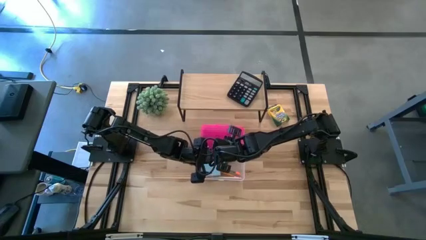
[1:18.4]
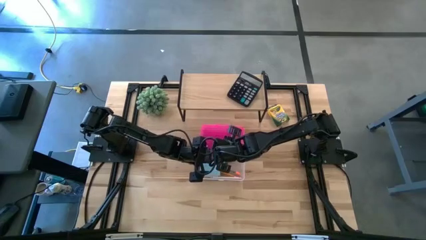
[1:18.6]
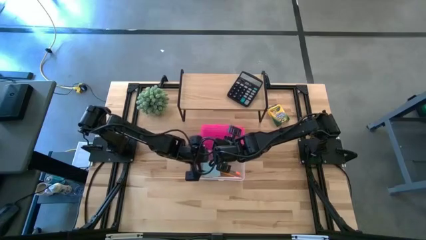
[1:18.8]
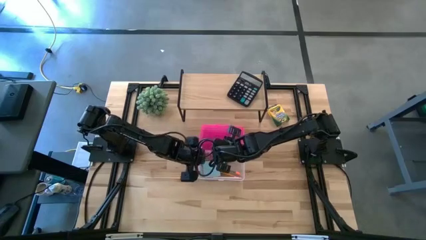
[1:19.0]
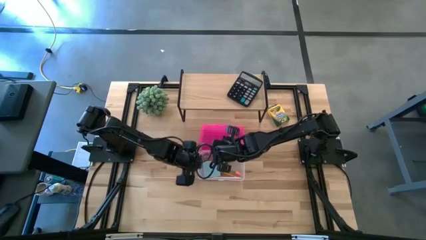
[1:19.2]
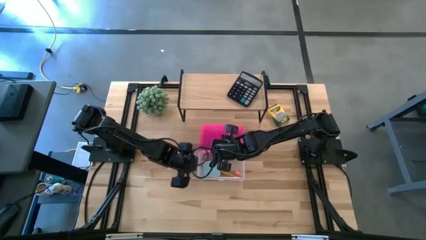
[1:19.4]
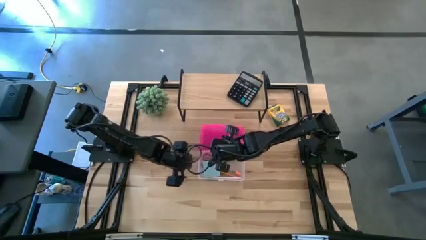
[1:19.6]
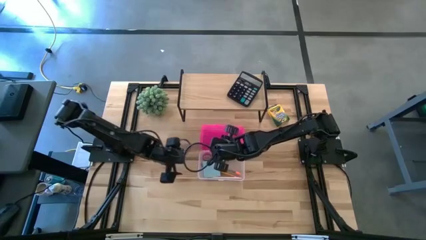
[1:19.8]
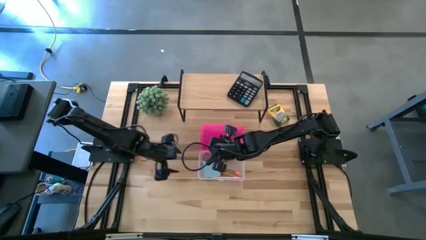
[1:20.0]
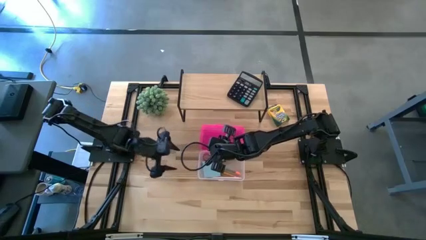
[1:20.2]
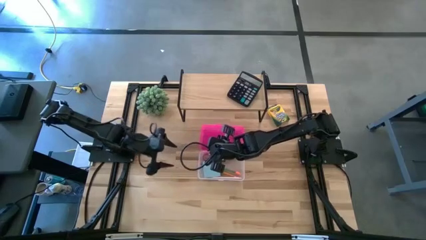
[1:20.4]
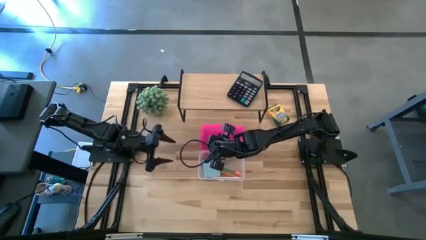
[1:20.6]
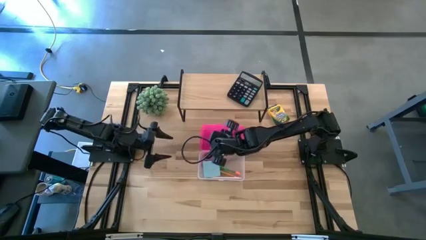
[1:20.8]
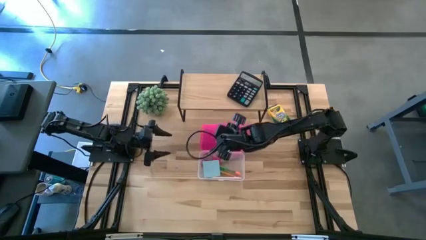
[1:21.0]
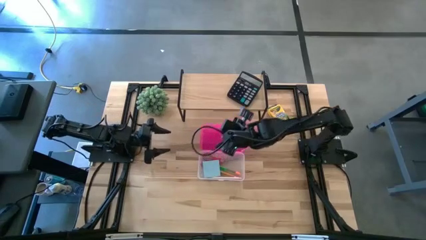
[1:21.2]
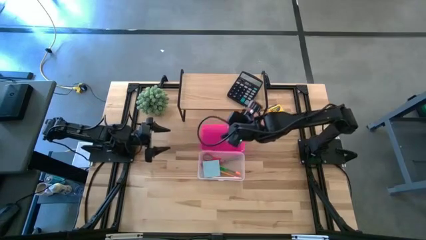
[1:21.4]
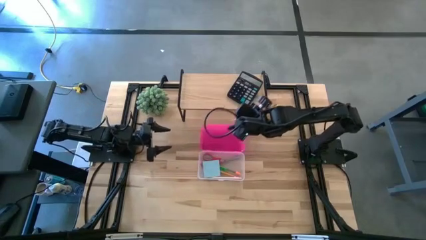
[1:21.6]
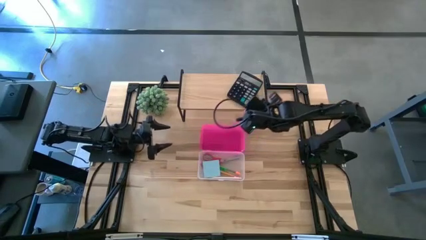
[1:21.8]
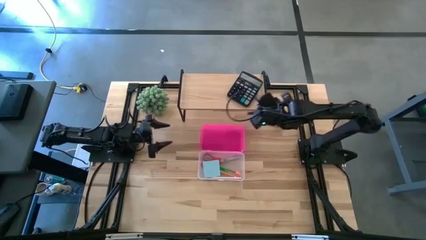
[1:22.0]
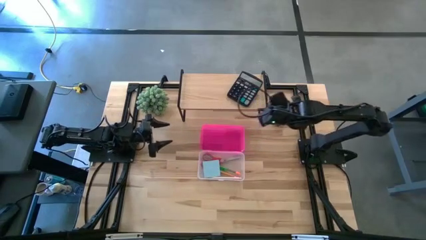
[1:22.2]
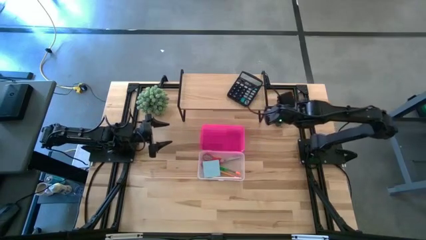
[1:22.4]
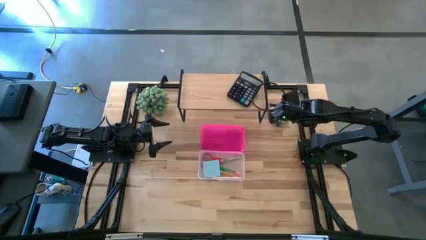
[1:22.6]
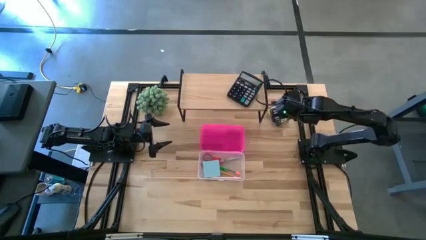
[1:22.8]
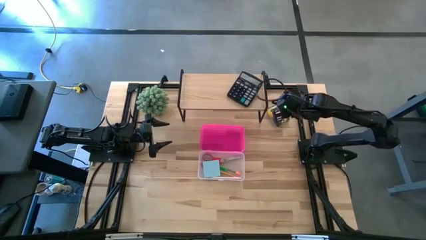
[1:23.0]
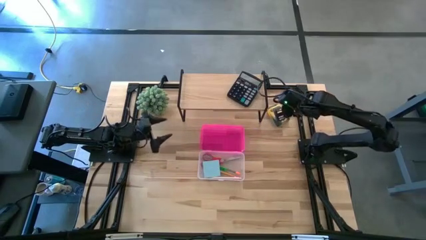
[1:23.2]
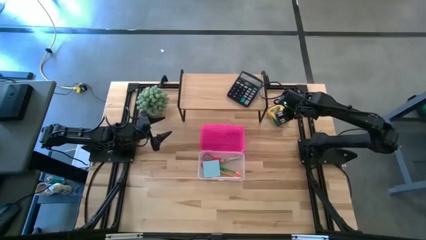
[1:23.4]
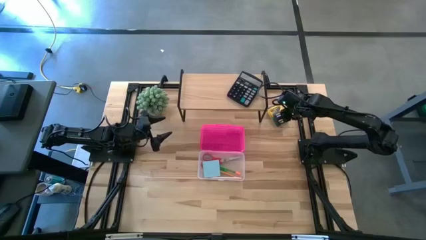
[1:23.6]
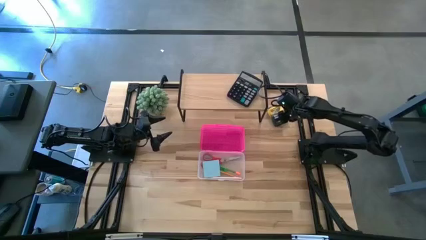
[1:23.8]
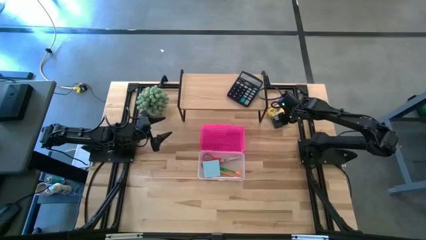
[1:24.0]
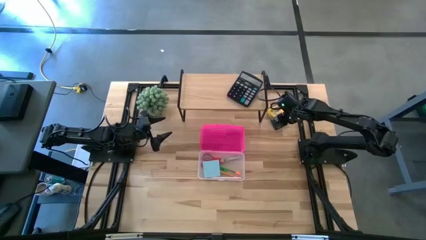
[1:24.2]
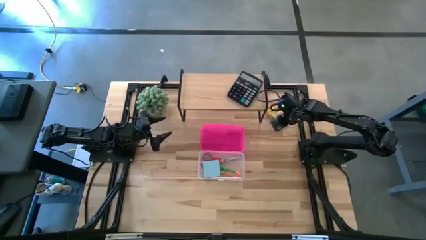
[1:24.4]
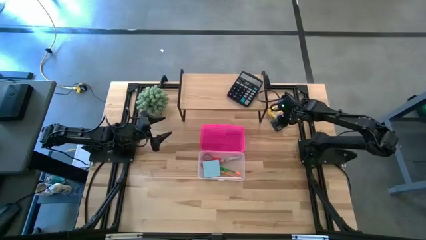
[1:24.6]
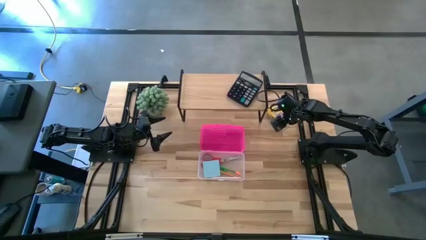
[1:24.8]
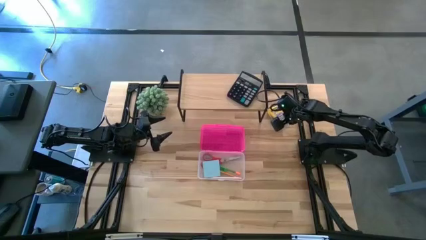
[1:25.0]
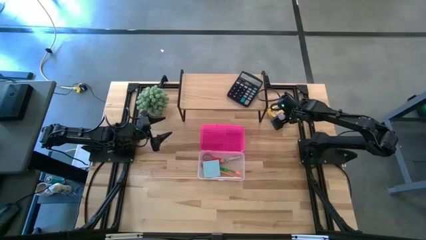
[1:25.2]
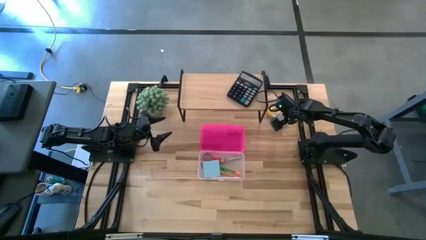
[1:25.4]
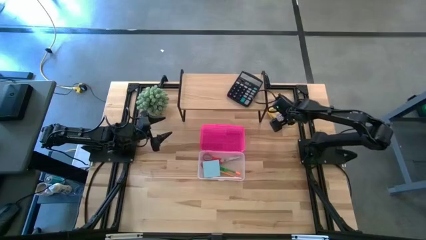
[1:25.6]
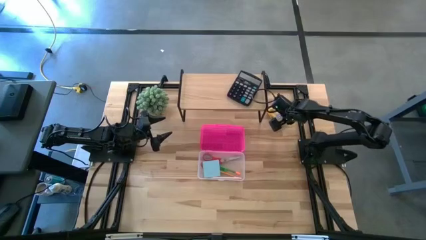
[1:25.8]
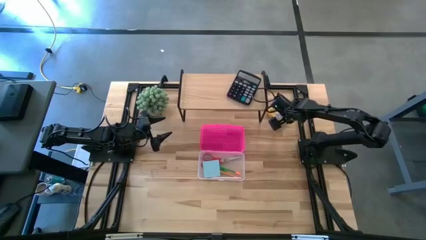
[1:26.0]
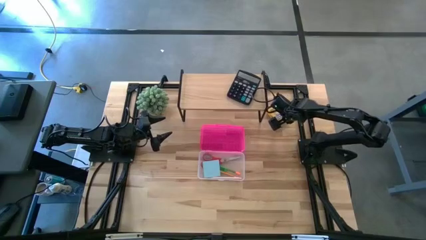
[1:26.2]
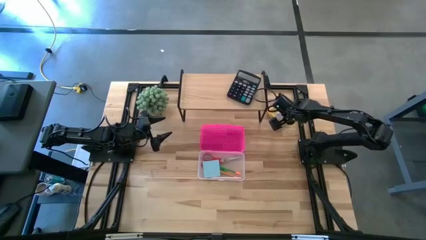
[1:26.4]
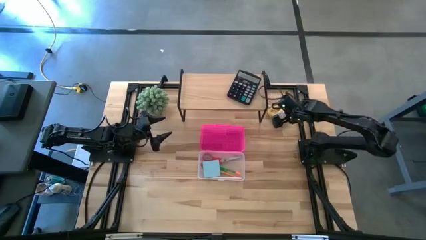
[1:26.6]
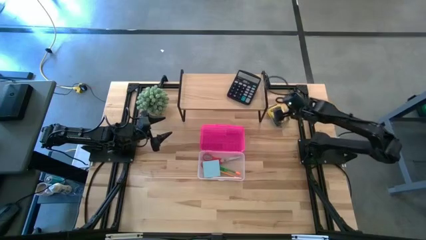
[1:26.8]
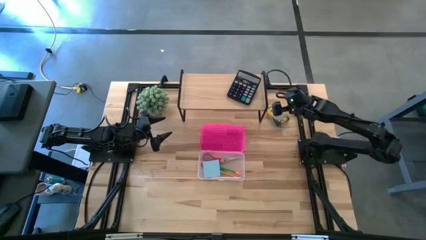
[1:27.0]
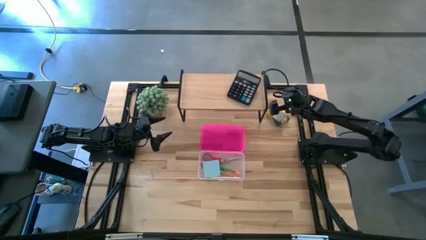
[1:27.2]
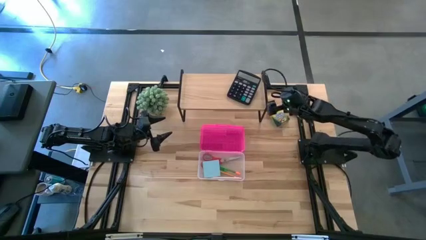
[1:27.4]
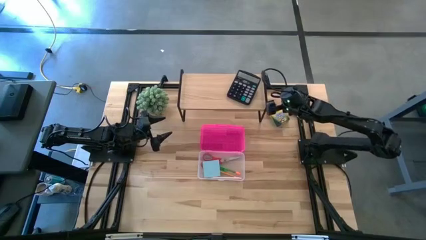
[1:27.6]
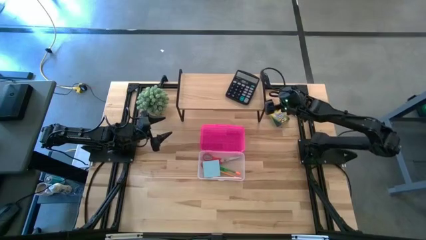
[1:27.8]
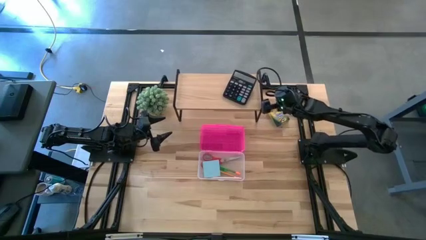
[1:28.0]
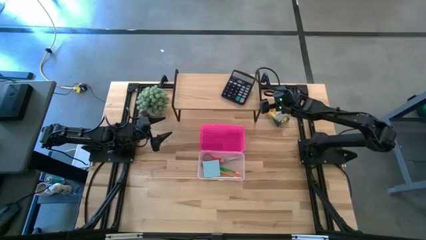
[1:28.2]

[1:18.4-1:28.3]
Task: Pack school essentials
Adjust the shelf

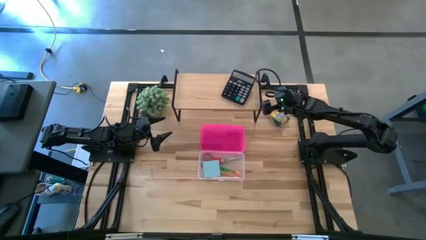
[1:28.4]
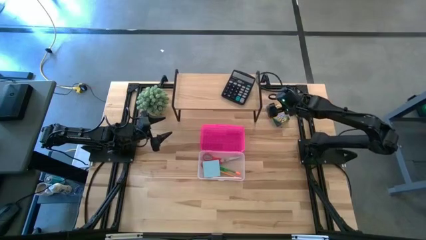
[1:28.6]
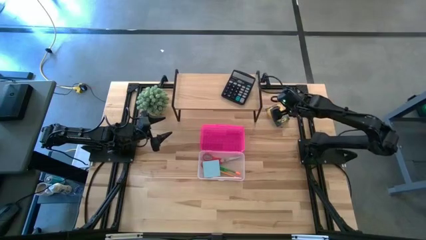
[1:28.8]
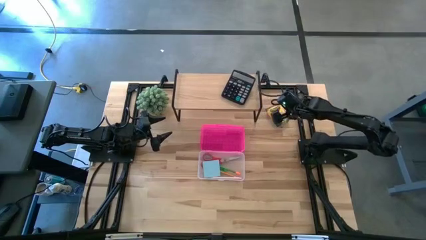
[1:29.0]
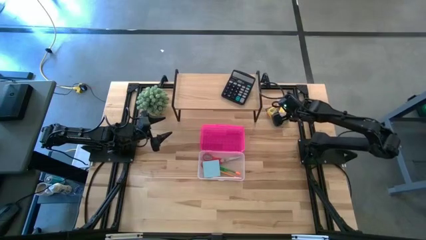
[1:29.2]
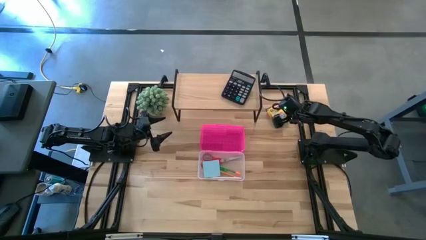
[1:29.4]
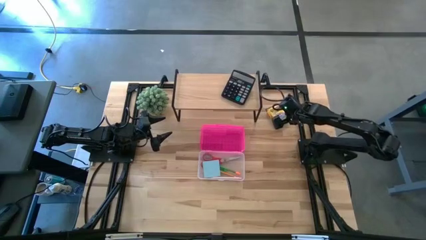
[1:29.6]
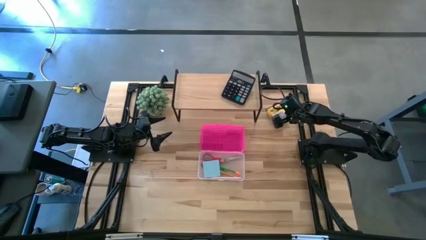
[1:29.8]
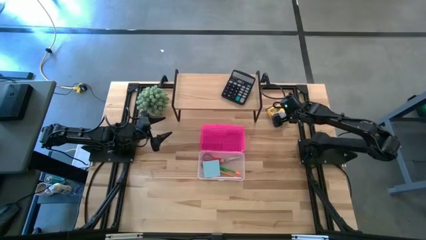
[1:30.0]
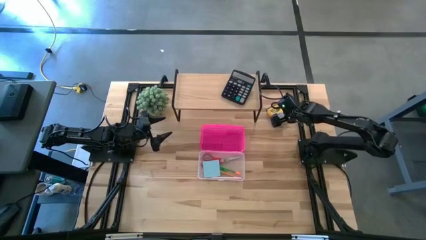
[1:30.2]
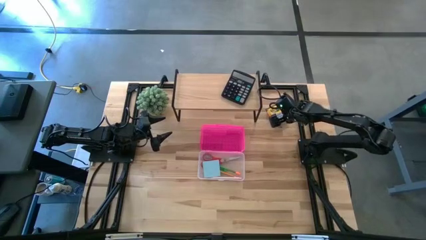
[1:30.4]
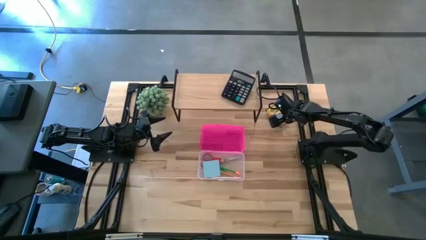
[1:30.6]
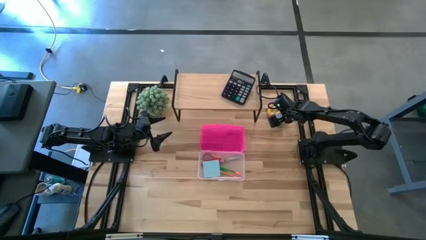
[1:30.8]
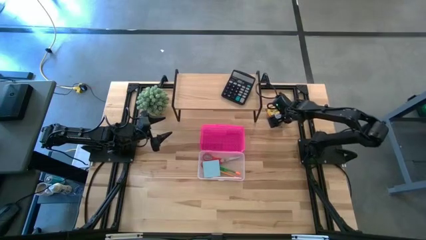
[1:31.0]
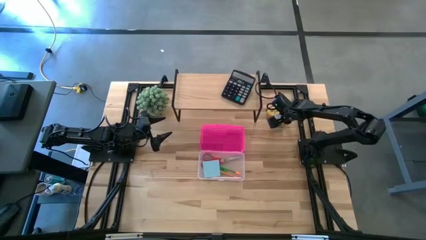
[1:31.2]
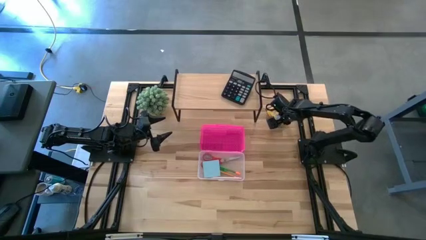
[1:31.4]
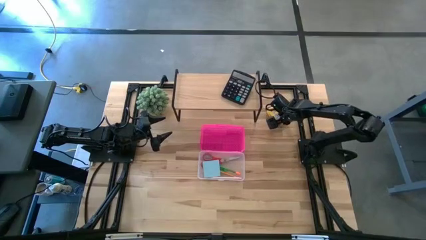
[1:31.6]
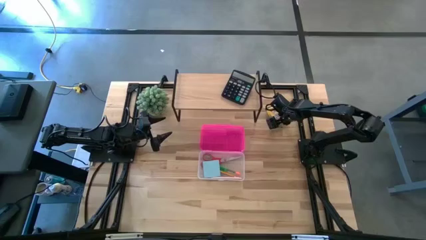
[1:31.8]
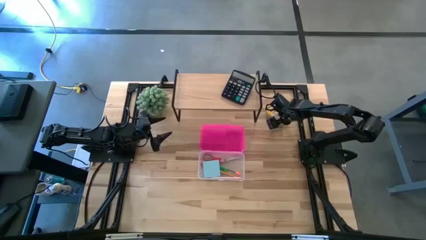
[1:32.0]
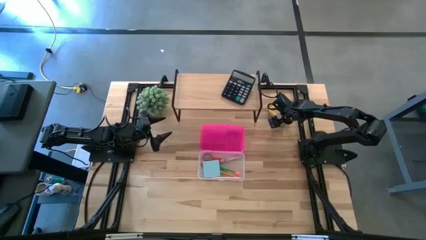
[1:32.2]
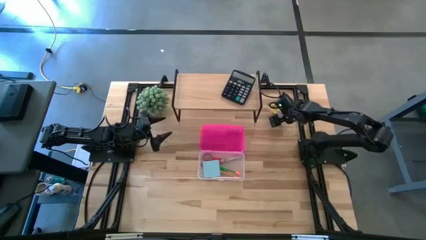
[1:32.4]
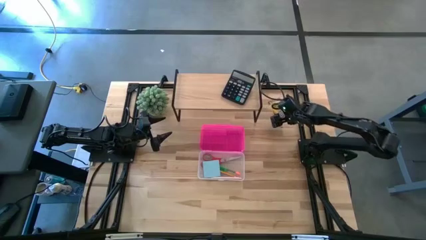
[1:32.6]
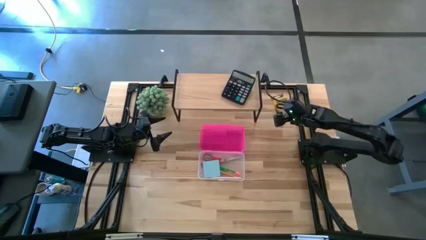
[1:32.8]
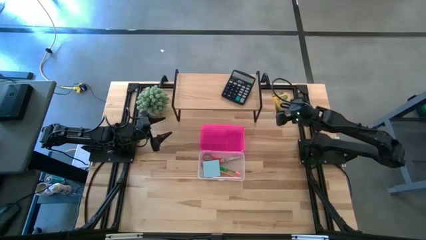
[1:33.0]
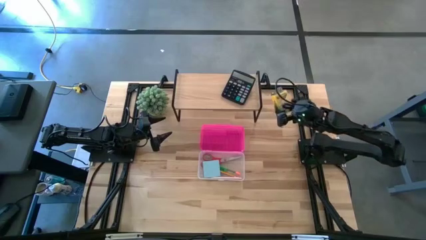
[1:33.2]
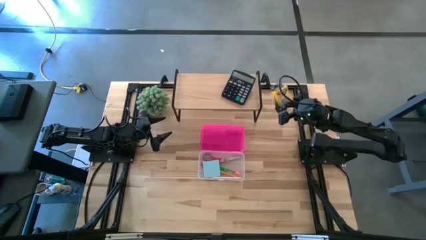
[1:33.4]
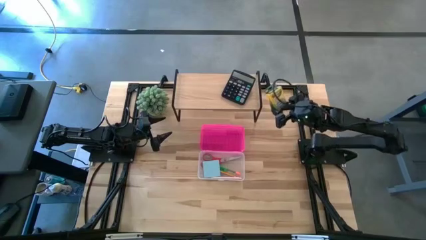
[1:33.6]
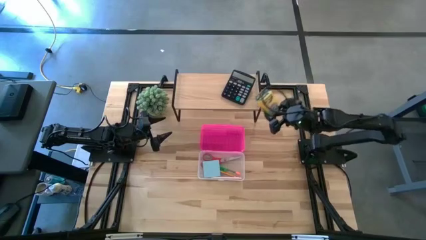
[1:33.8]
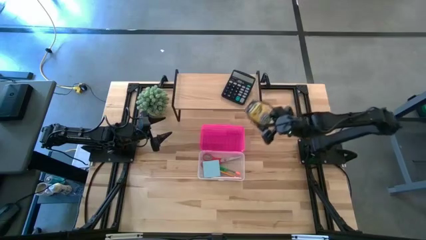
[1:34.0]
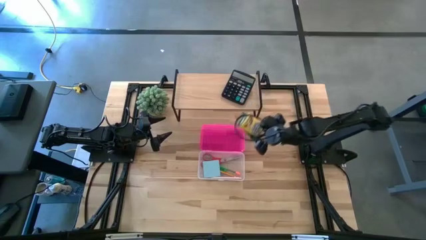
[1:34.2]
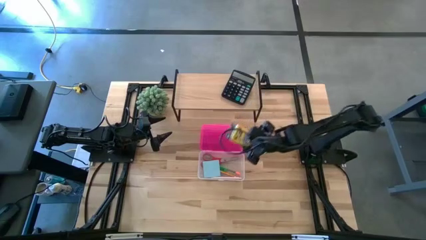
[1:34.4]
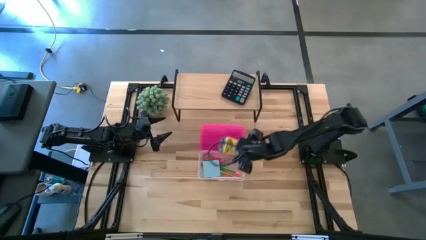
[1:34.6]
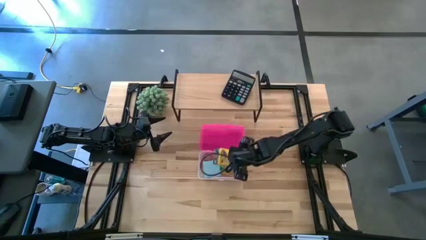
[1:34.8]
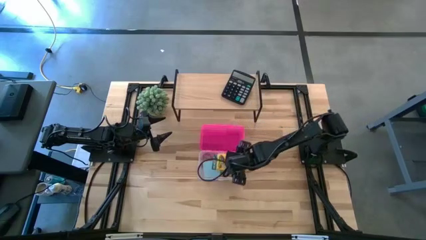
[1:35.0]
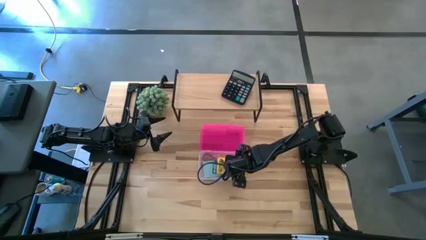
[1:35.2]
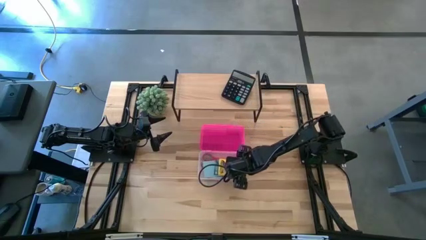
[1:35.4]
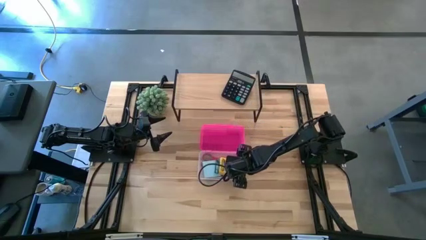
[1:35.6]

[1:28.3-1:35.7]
Put the crayons into the white bin
